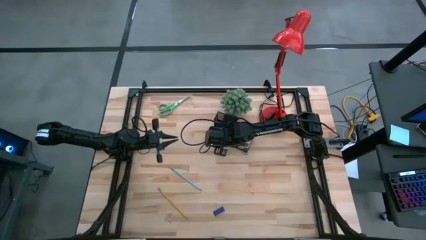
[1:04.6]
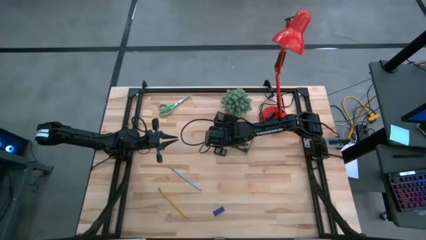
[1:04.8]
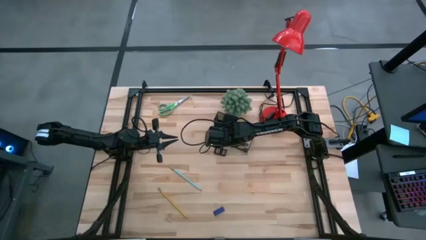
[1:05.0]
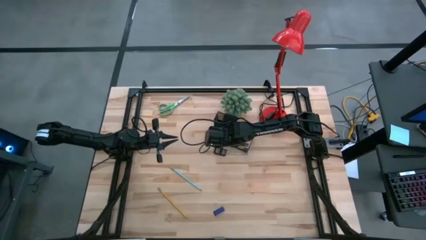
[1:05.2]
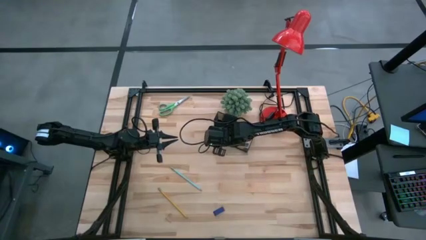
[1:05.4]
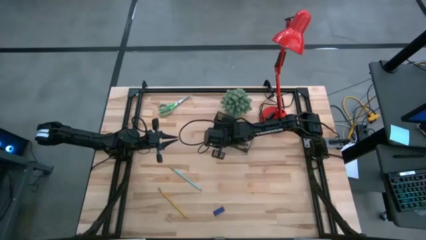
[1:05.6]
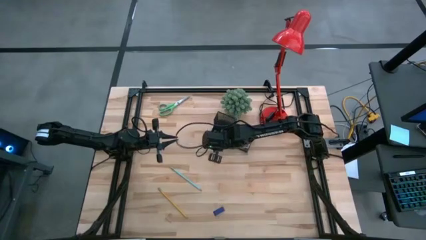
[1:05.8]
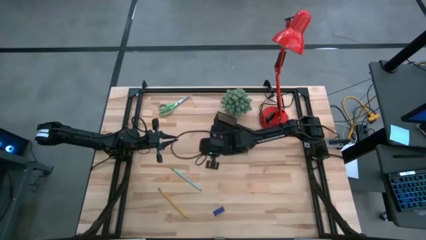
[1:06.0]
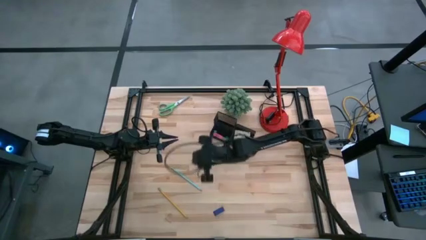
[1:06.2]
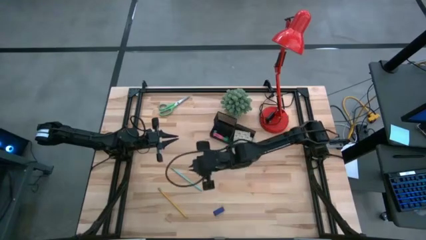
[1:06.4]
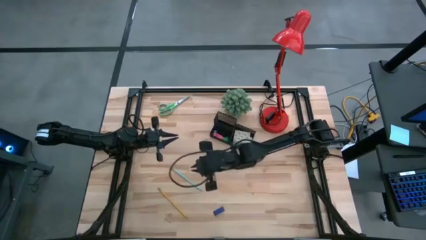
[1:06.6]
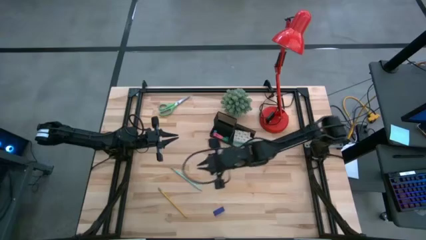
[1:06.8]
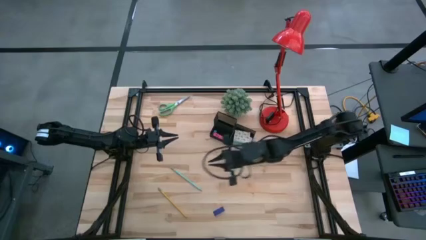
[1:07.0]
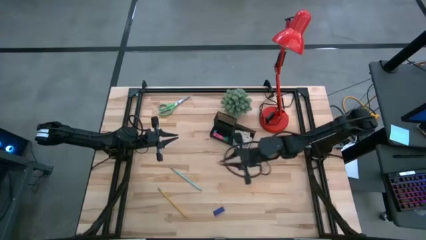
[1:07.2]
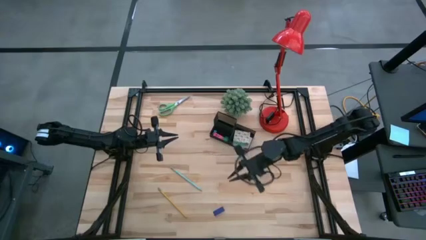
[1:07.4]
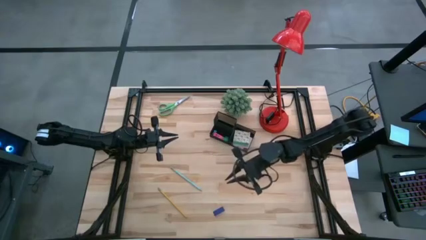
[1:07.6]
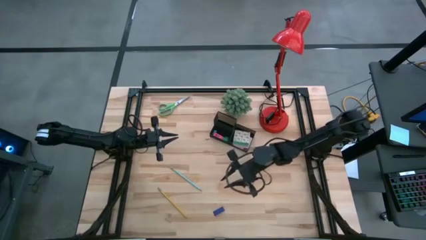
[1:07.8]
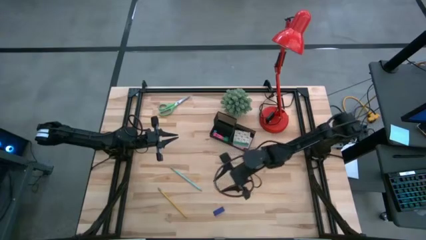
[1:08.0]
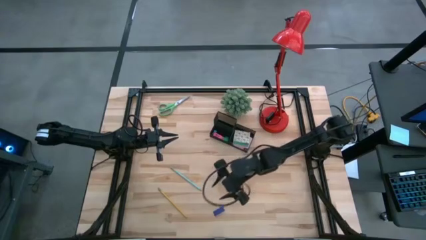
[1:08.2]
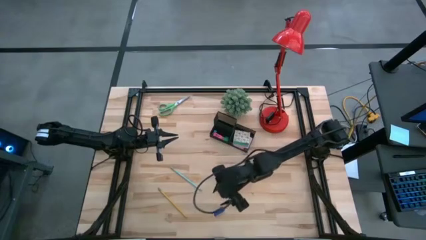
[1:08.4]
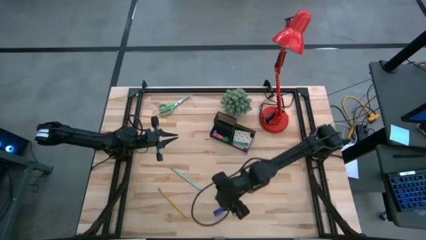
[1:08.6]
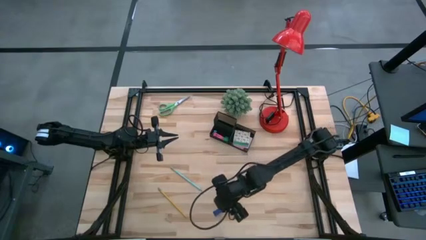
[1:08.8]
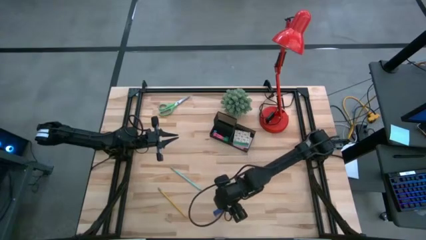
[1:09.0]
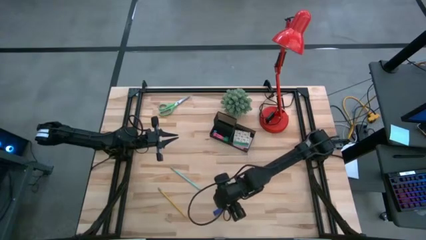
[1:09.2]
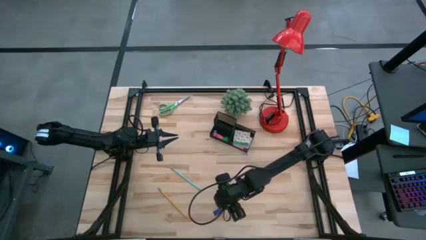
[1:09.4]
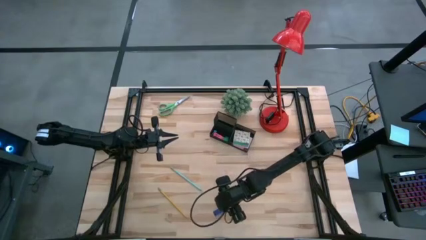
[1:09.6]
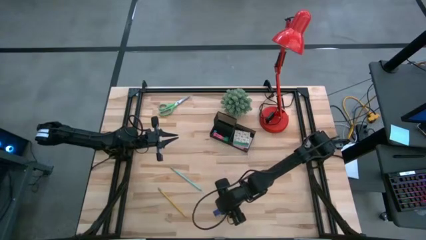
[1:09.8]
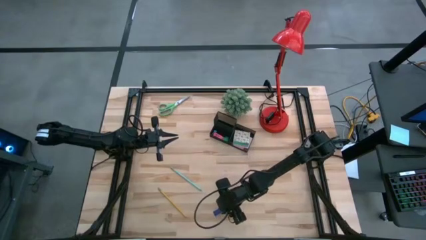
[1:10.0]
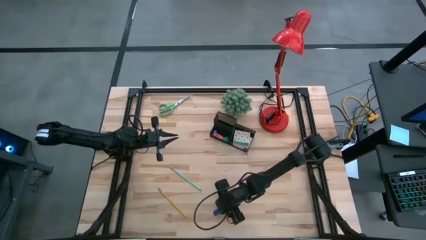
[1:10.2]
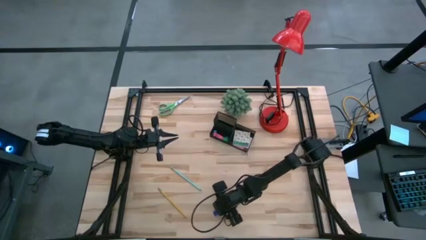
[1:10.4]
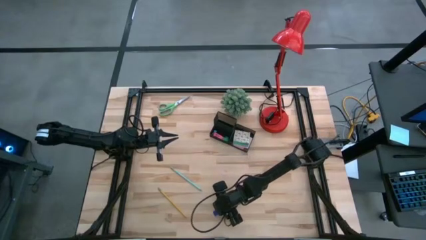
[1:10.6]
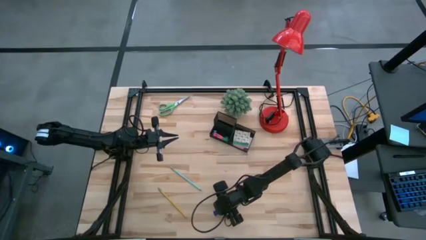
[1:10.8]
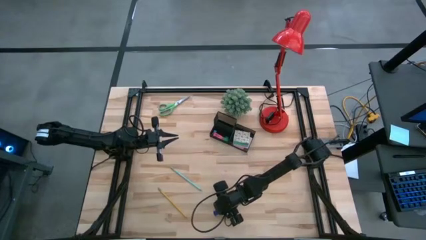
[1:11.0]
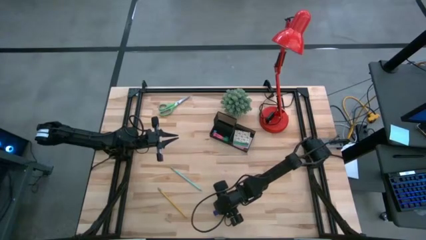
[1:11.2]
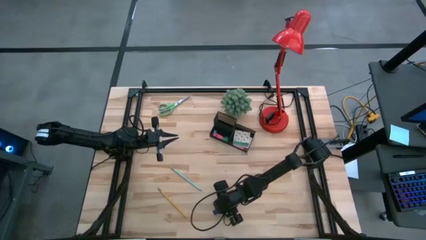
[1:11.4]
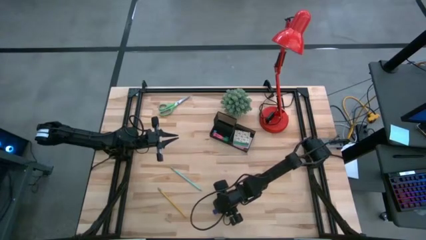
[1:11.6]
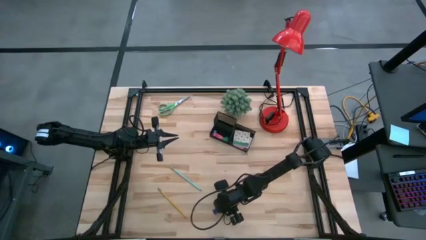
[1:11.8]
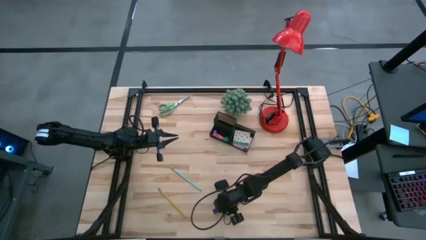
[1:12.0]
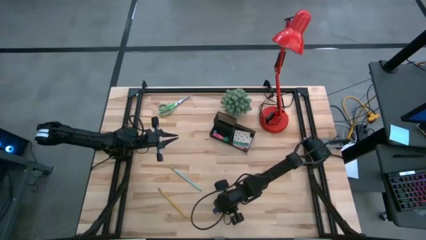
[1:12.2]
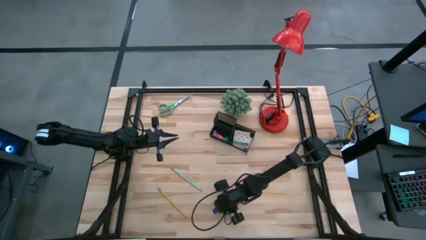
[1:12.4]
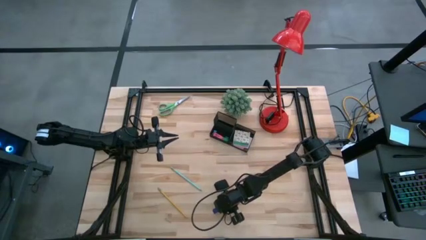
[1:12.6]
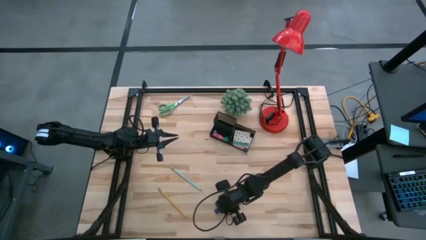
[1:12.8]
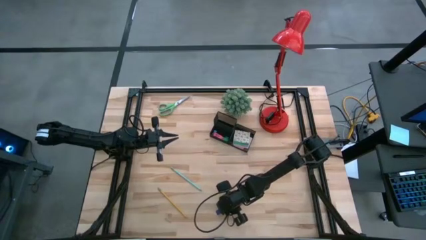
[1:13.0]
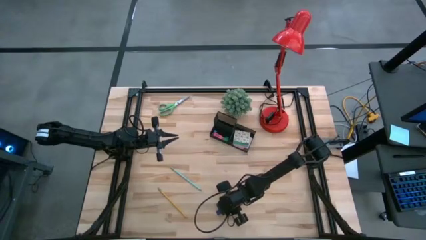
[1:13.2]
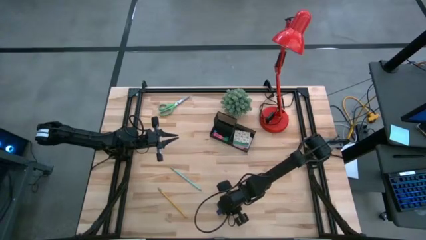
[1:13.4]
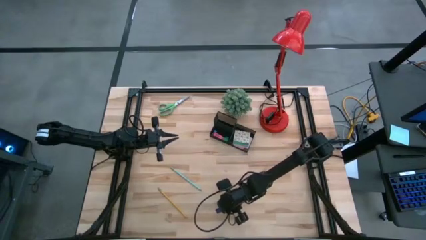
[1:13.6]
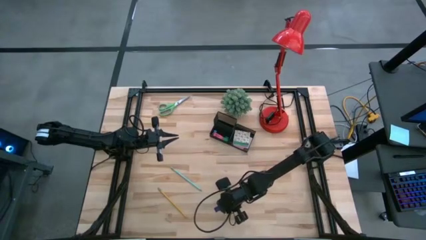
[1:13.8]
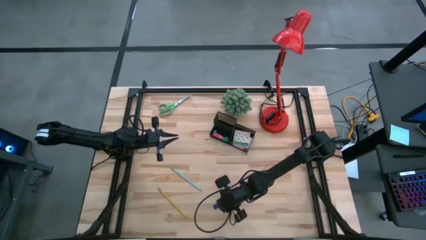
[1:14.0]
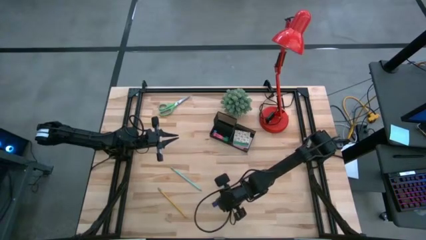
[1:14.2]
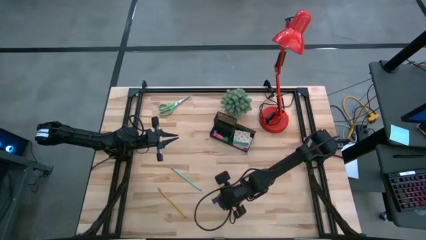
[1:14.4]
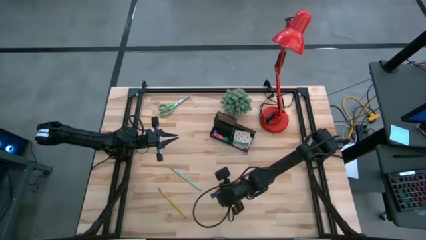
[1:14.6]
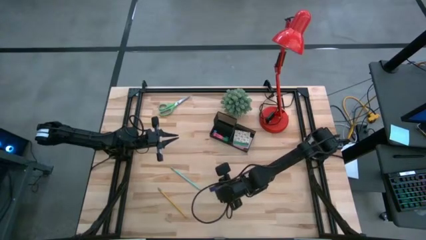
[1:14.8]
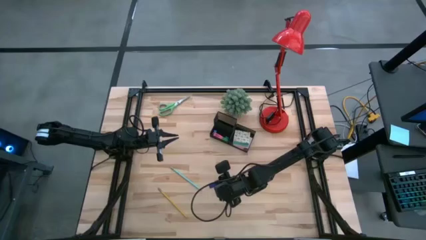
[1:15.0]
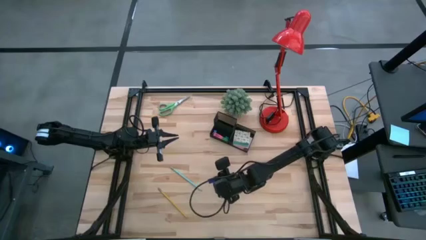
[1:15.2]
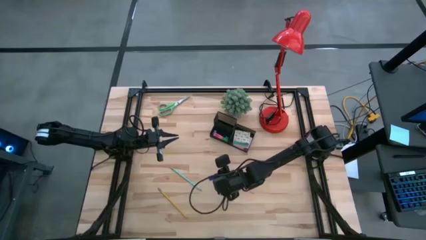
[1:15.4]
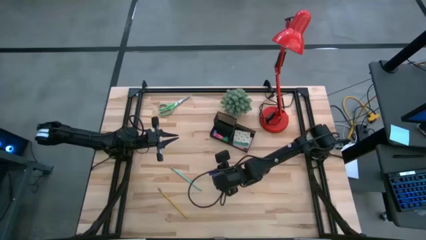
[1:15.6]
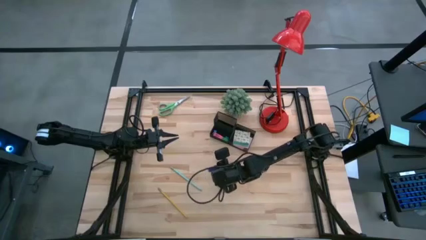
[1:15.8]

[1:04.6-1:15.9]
Task: Pick and place office supplies into organizer
Put the blue eraser into the black desk organizer
